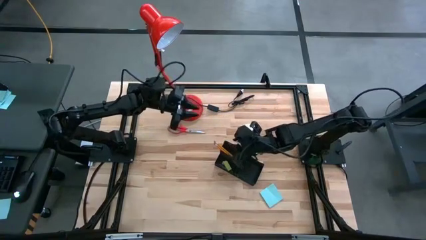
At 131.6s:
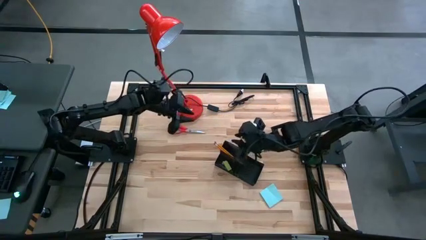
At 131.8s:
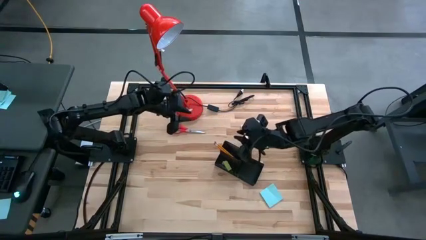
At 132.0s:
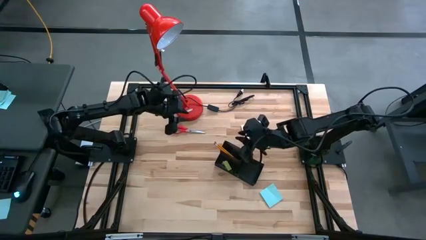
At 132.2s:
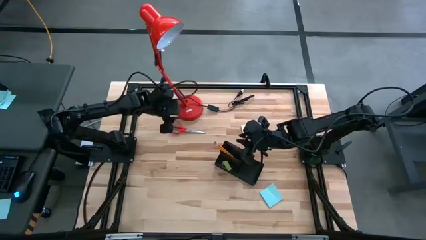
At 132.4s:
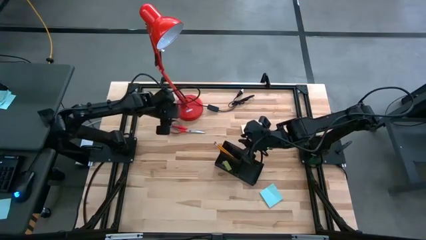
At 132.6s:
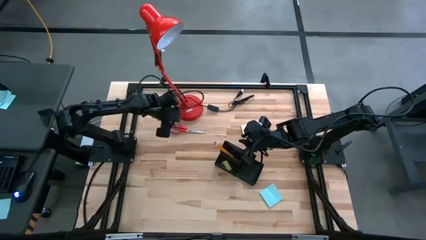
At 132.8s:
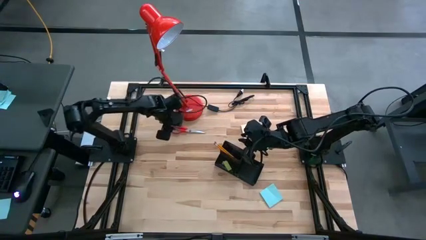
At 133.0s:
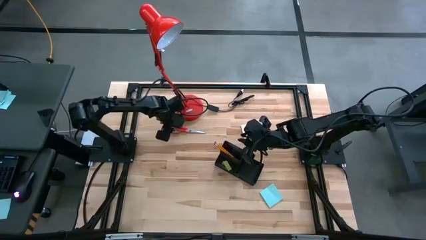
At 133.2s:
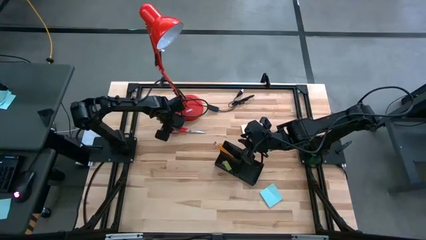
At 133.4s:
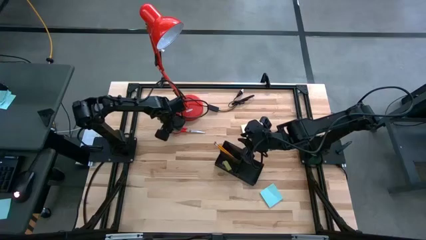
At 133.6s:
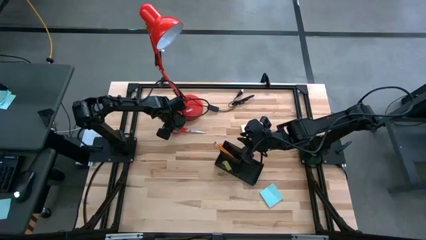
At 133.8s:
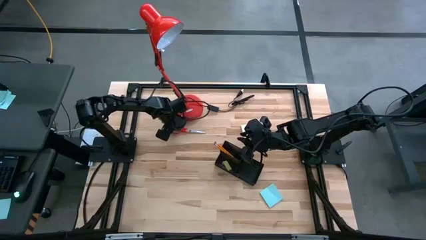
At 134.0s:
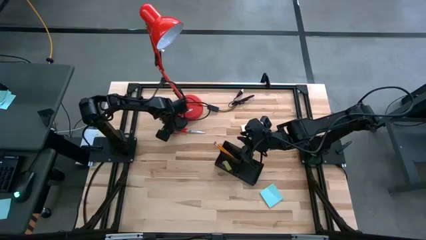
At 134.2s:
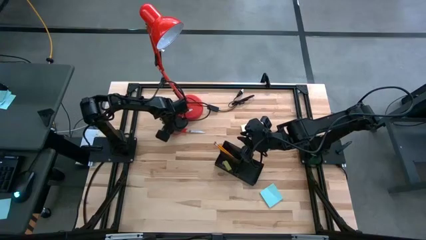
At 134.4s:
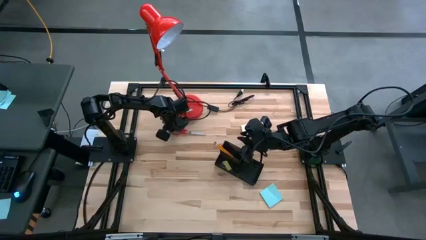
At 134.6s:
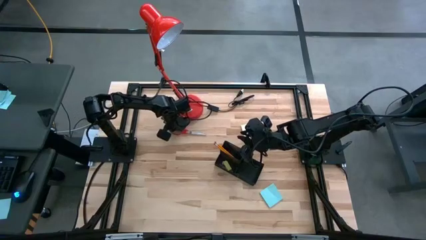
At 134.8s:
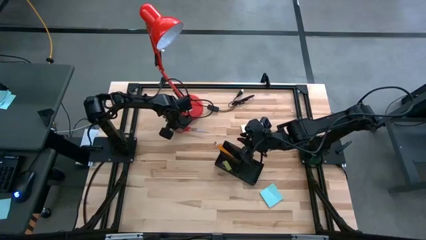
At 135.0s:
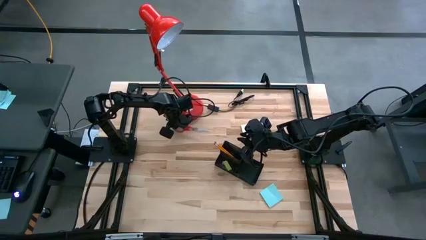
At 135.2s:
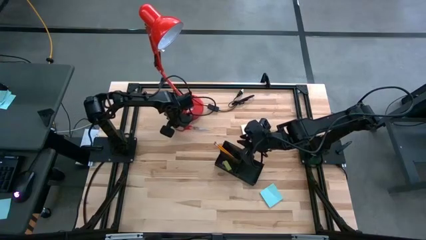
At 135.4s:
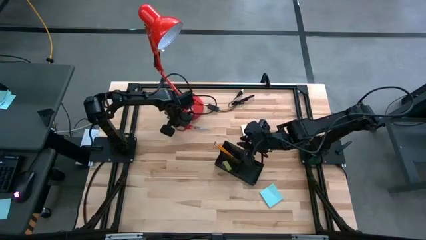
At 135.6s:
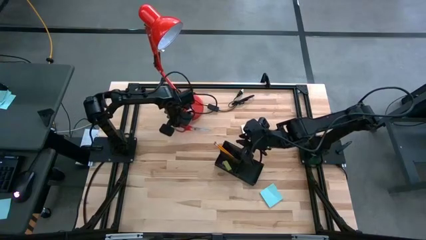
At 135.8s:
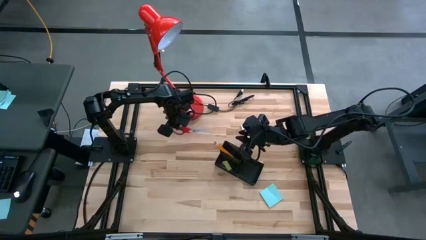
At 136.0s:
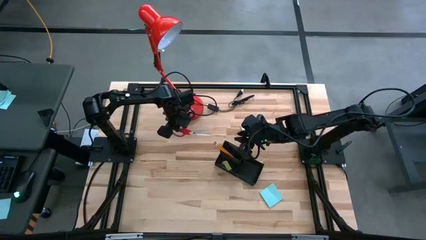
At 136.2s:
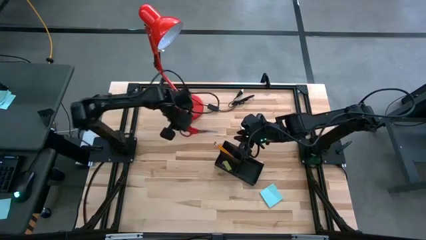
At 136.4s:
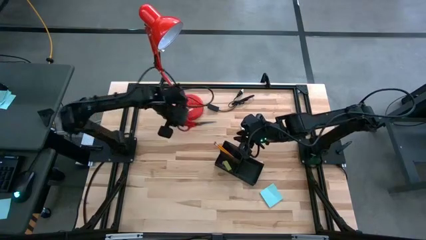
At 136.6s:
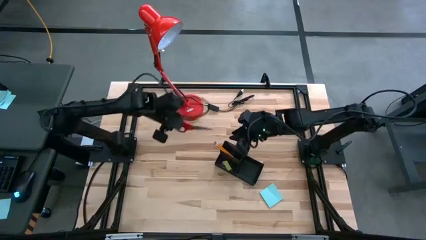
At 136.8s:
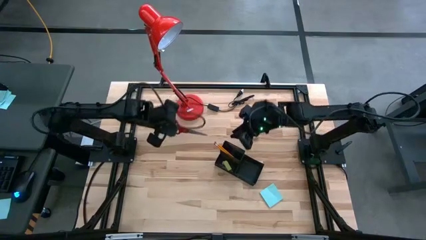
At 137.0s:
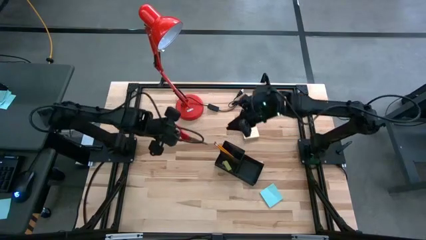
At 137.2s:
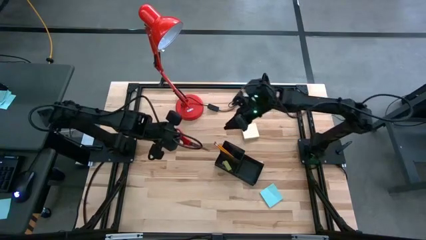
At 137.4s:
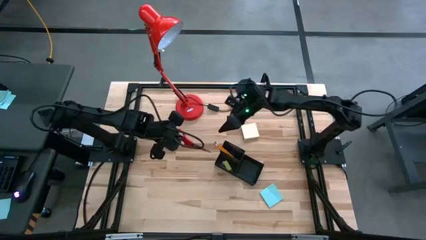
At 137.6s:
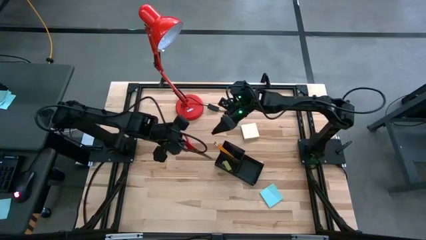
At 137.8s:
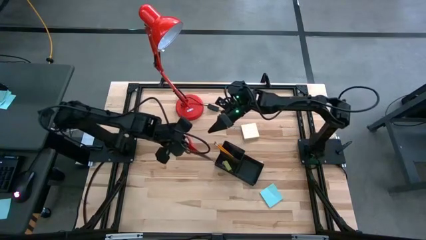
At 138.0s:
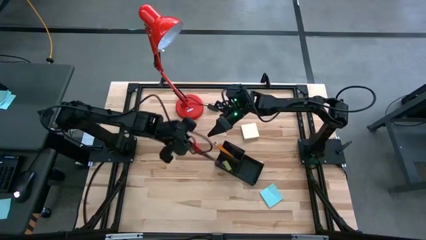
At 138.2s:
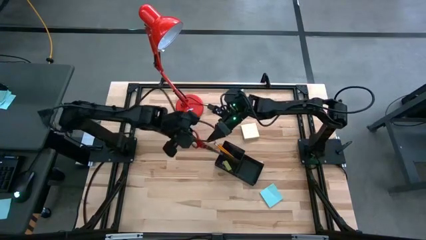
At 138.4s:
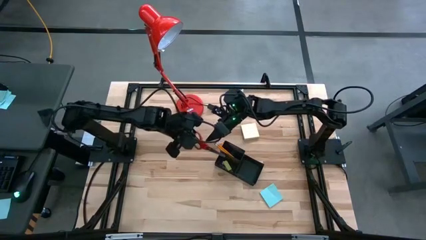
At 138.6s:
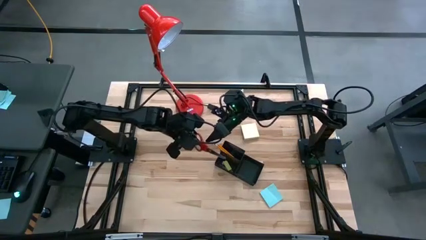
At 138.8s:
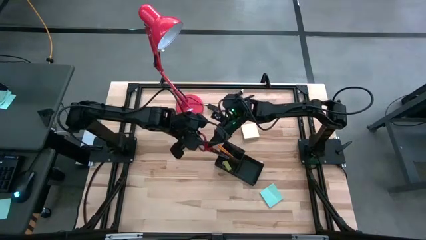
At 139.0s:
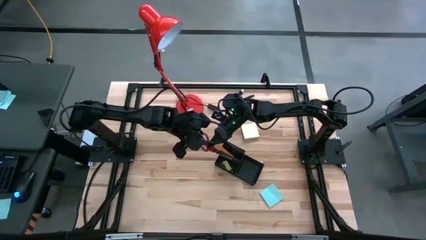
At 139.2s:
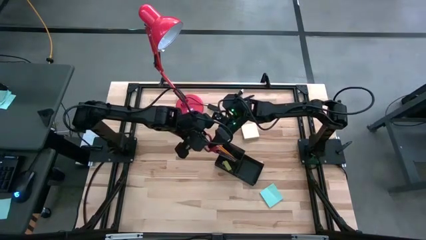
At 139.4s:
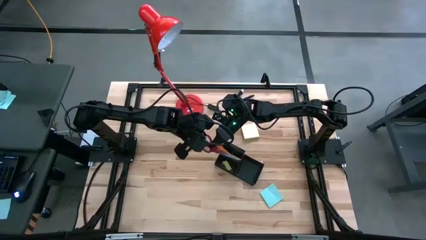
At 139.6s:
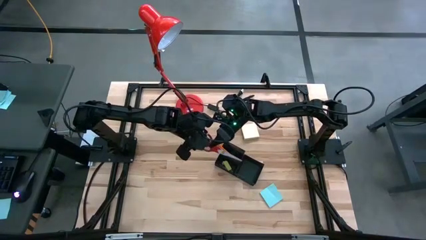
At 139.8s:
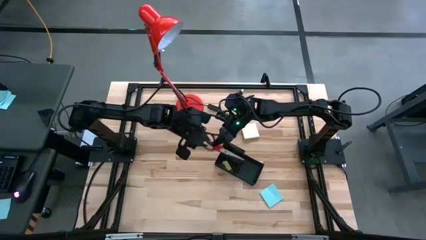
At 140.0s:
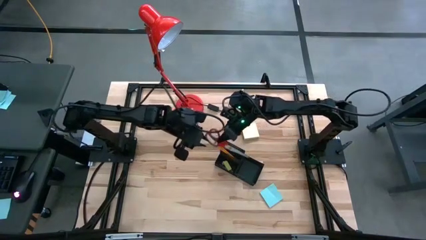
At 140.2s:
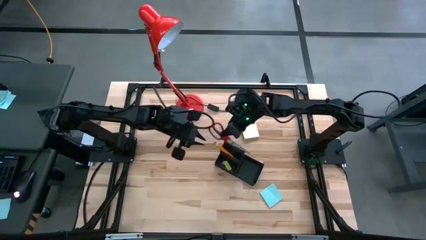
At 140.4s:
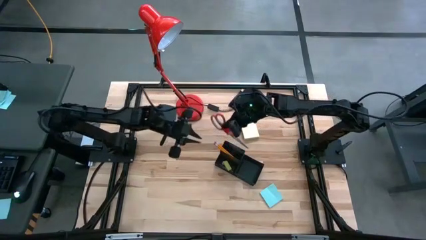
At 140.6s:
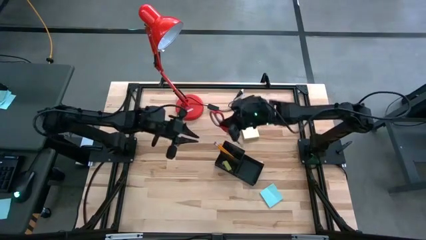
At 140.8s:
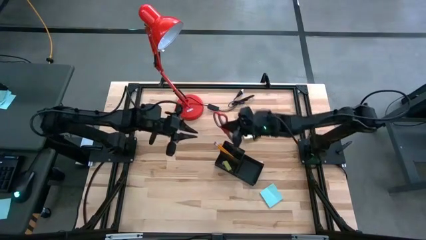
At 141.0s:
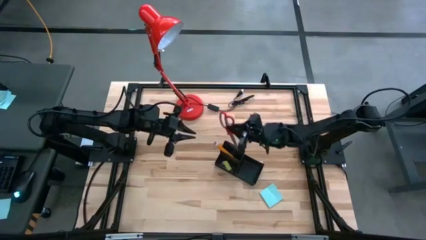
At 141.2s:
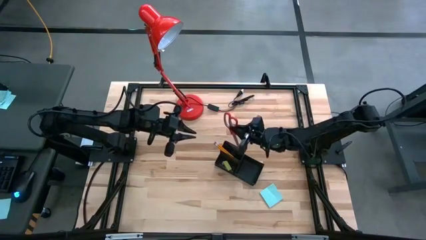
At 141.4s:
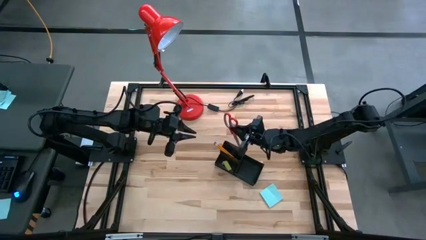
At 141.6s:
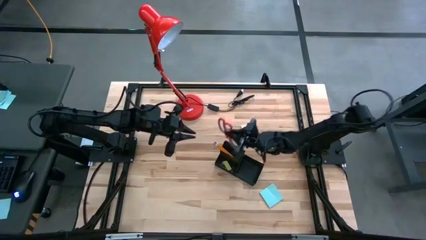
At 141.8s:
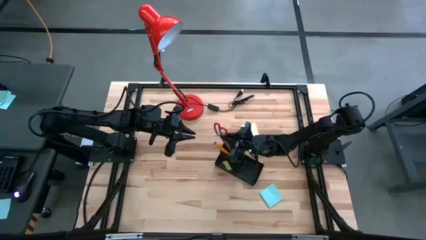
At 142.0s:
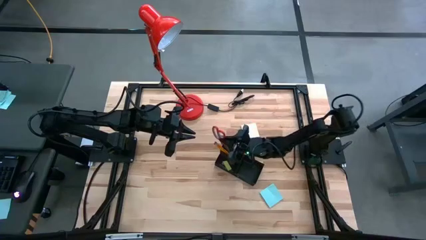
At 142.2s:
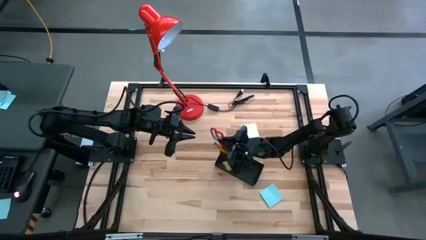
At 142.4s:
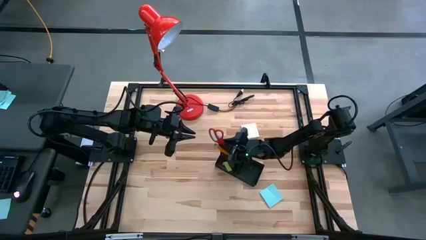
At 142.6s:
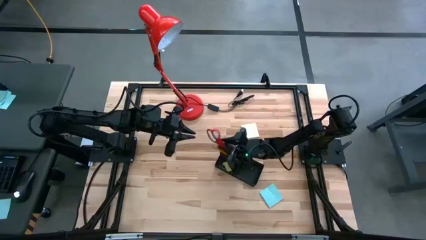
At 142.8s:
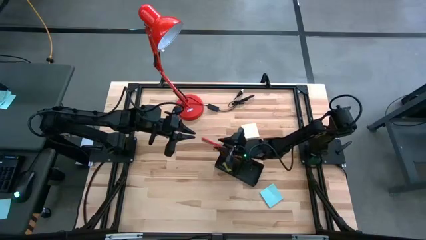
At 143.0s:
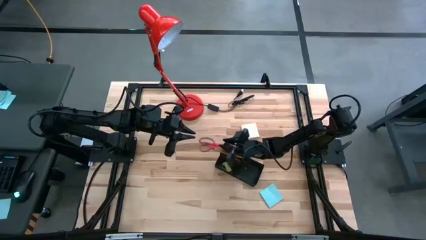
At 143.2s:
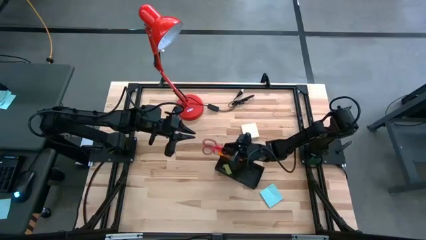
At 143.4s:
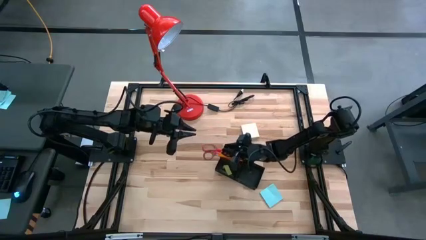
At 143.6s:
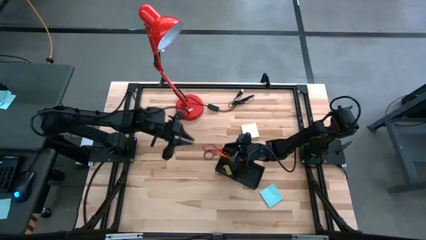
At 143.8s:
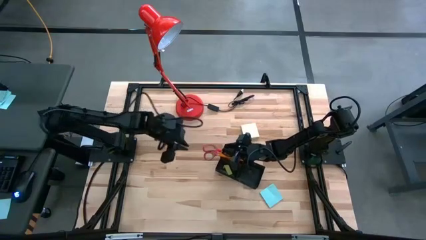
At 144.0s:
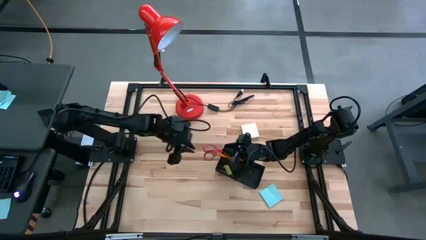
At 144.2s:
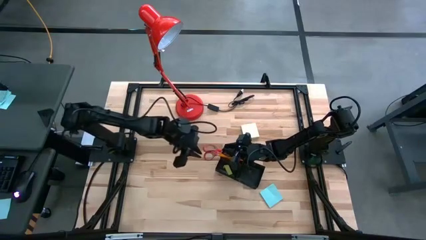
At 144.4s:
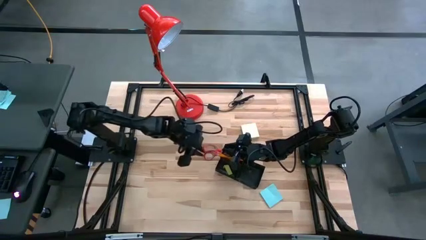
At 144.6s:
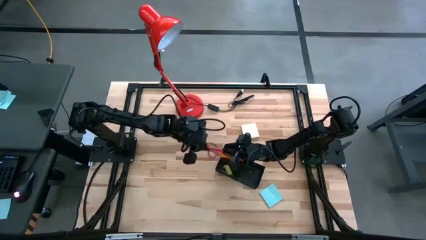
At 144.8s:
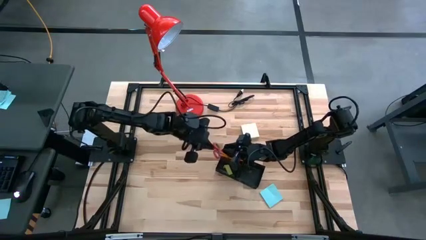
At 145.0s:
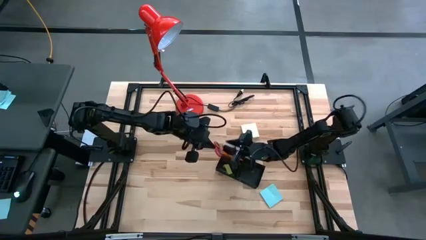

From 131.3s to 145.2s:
Task: Pick and place office supplies into organizer
Put the red scissors into the black desk organizer

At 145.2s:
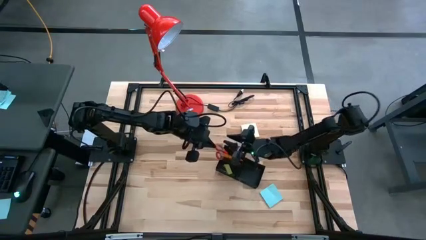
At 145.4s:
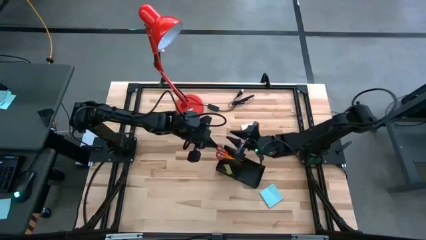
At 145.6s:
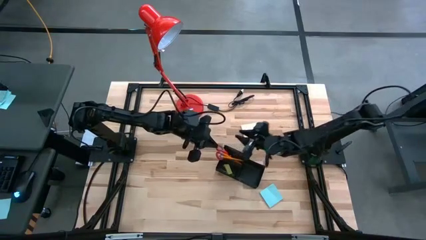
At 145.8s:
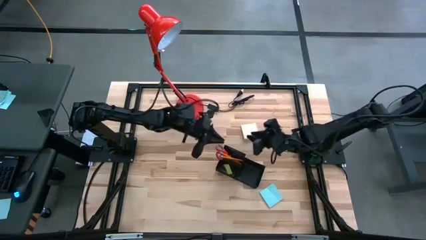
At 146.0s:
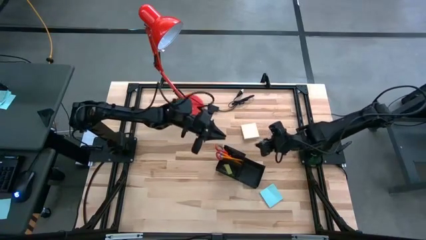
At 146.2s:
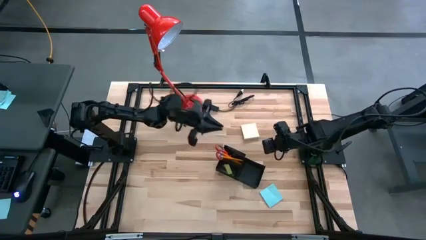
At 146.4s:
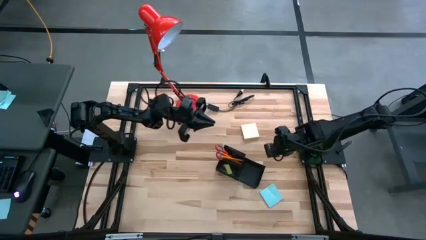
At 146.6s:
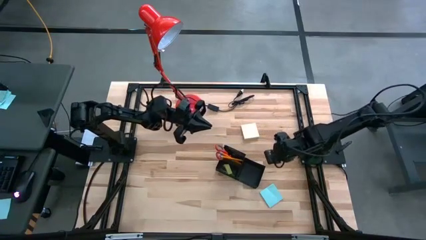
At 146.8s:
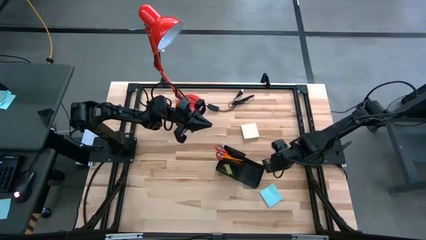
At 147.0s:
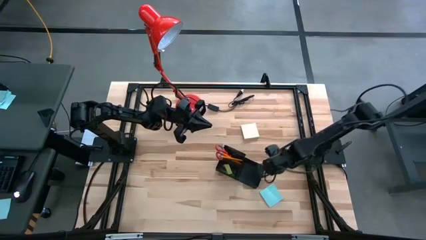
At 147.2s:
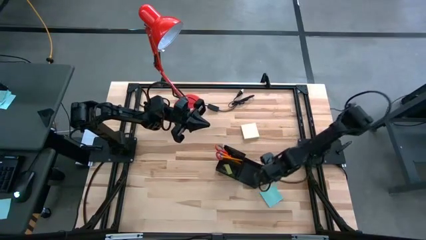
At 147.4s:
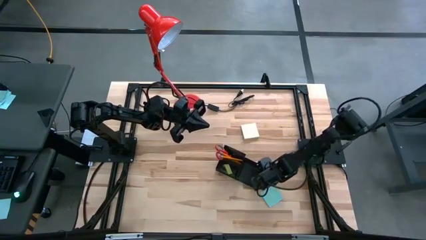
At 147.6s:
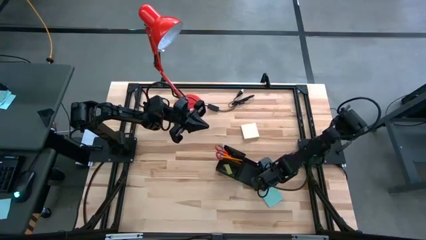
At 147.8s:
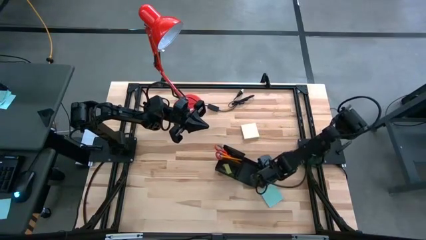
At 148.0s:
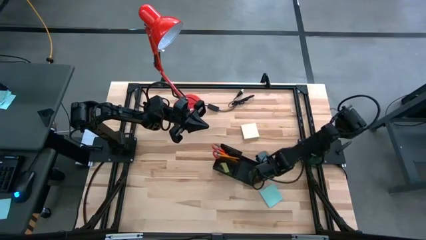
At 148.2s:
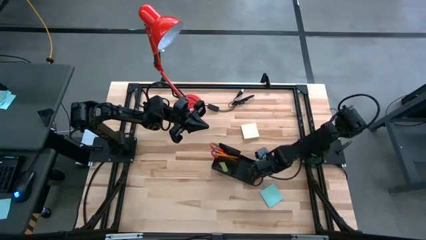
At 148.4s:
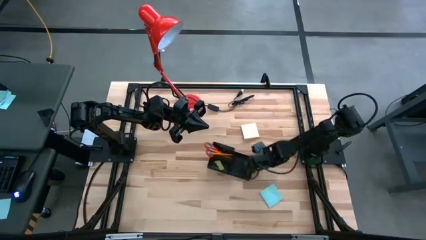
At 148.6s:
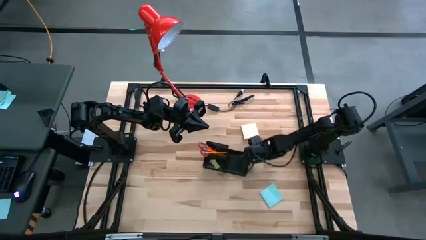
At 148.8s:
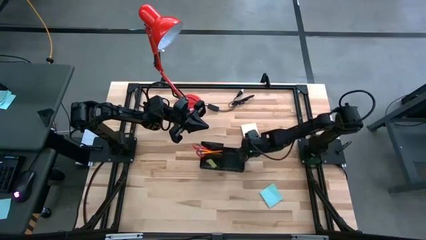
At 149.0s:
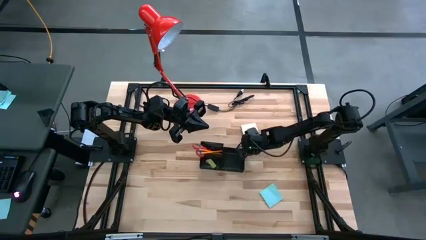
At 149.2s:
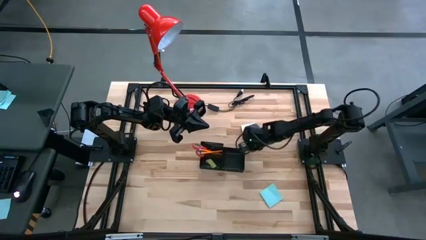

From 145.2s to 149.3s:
Adjust the black desk organizer
